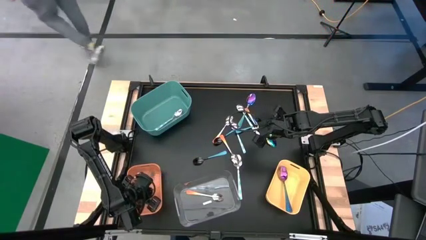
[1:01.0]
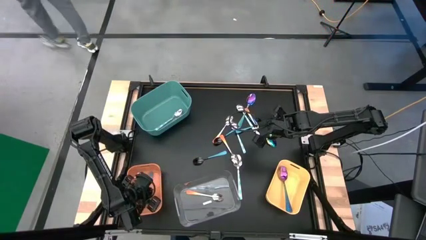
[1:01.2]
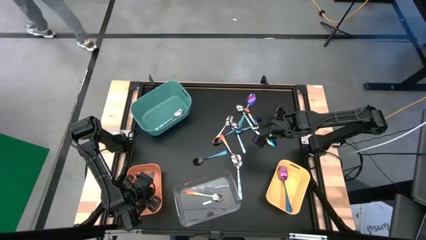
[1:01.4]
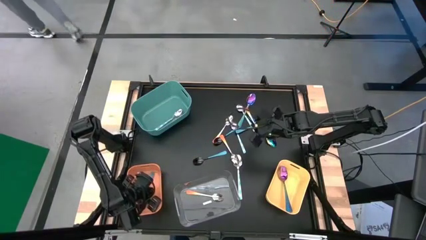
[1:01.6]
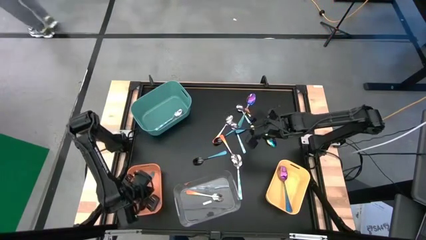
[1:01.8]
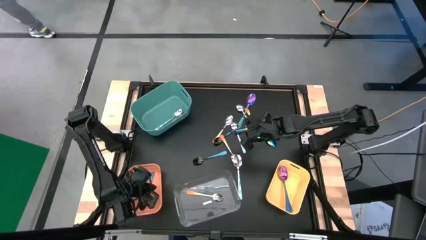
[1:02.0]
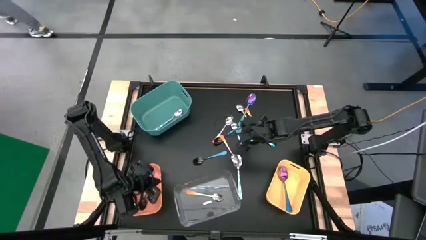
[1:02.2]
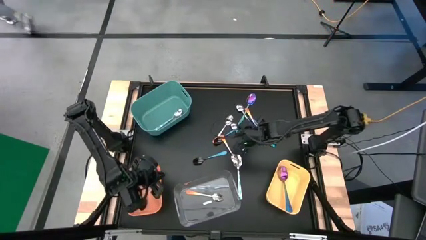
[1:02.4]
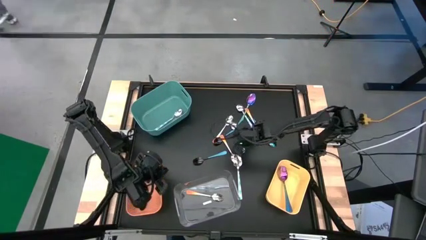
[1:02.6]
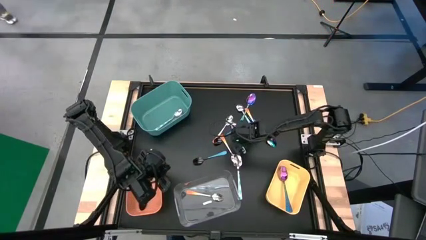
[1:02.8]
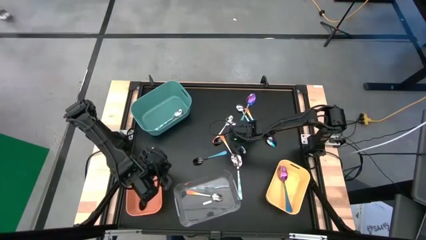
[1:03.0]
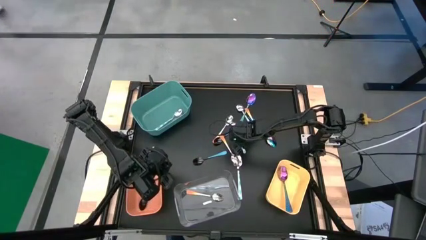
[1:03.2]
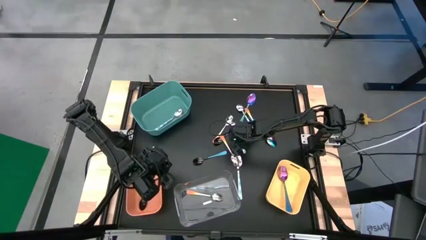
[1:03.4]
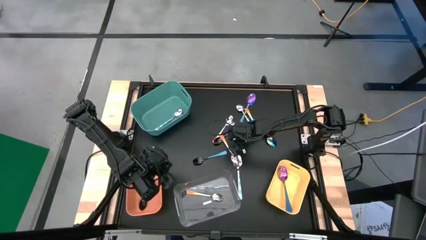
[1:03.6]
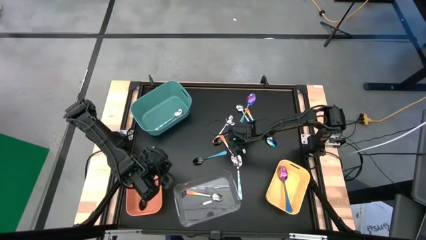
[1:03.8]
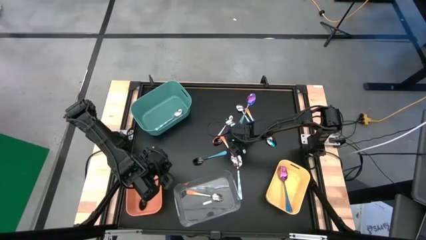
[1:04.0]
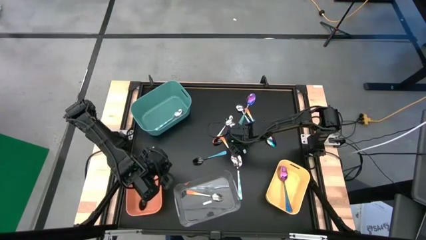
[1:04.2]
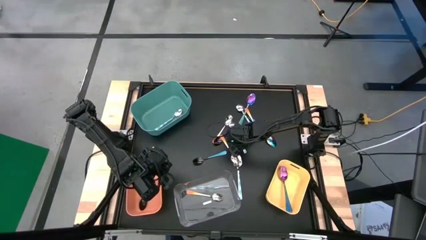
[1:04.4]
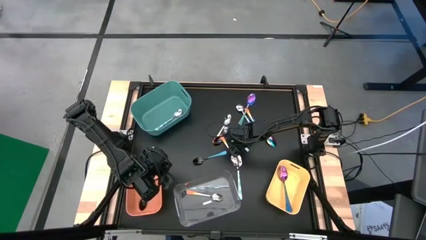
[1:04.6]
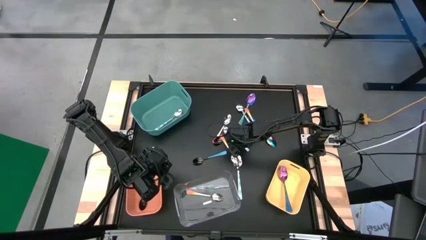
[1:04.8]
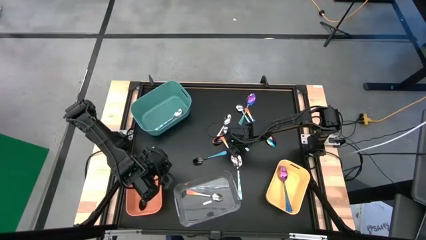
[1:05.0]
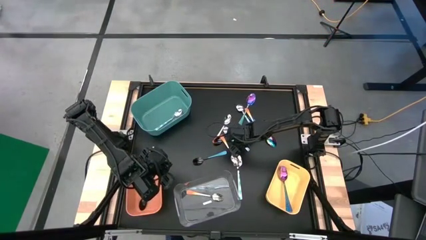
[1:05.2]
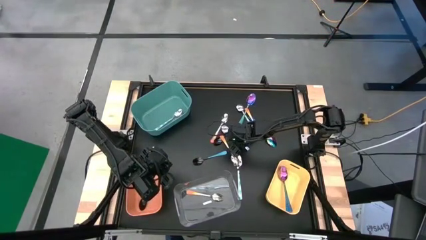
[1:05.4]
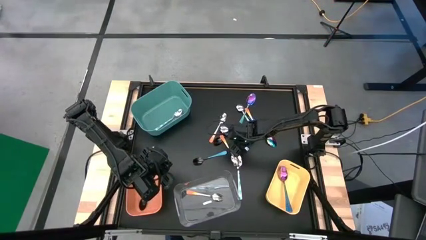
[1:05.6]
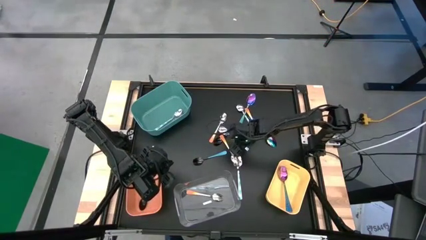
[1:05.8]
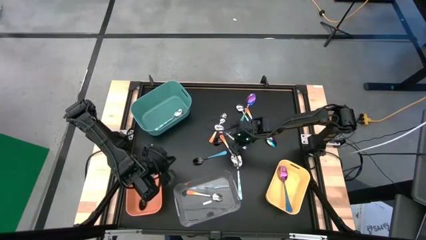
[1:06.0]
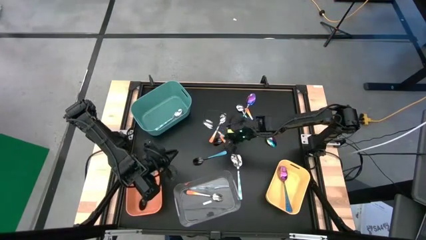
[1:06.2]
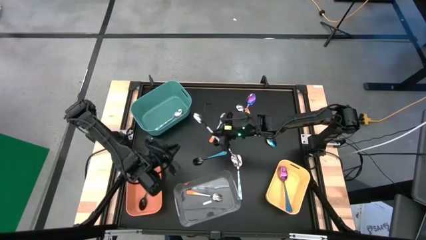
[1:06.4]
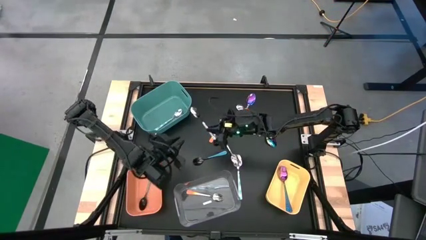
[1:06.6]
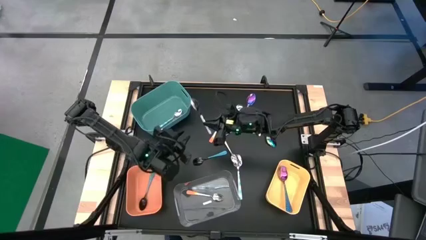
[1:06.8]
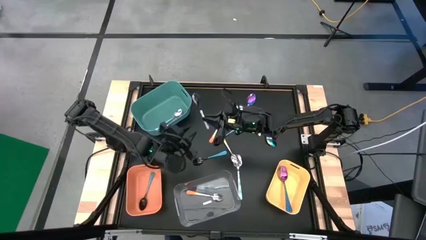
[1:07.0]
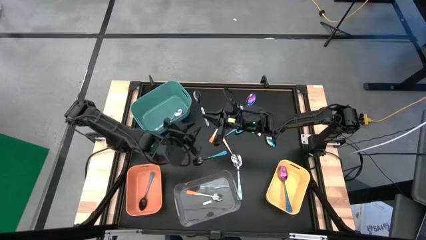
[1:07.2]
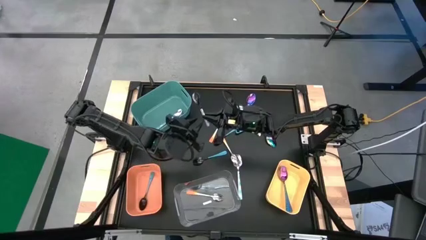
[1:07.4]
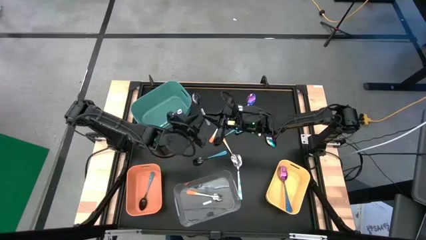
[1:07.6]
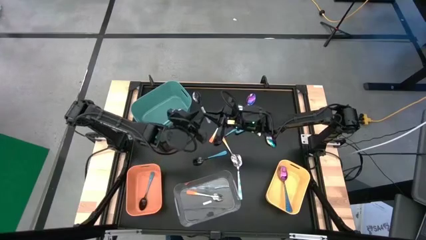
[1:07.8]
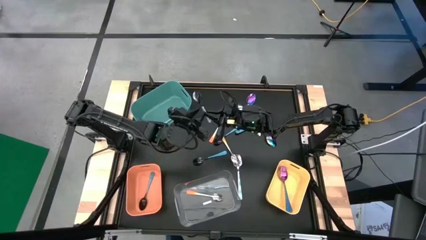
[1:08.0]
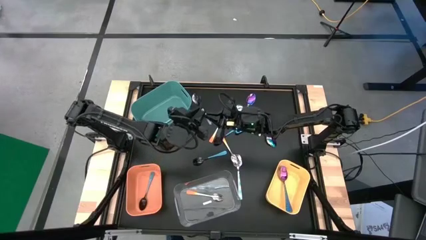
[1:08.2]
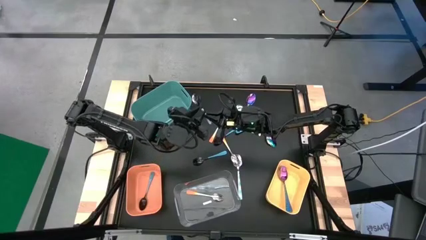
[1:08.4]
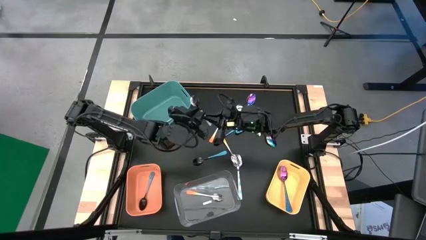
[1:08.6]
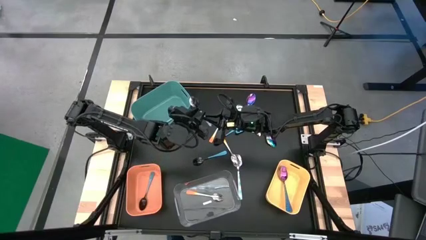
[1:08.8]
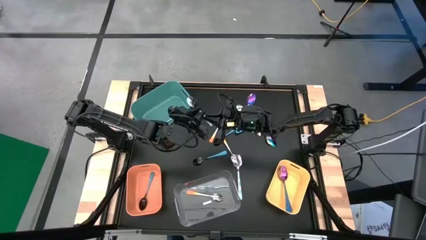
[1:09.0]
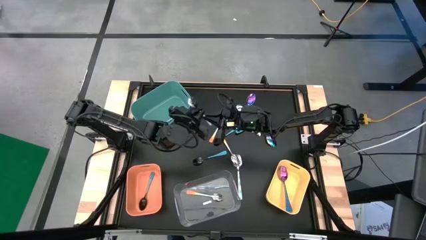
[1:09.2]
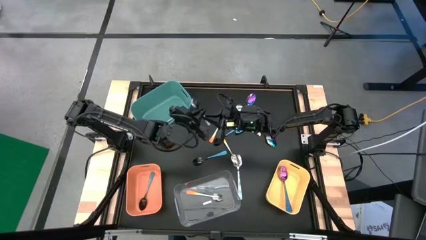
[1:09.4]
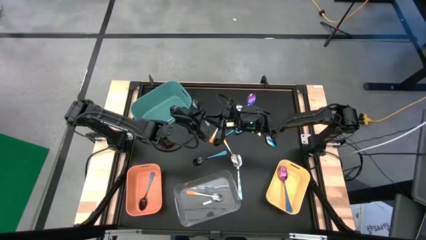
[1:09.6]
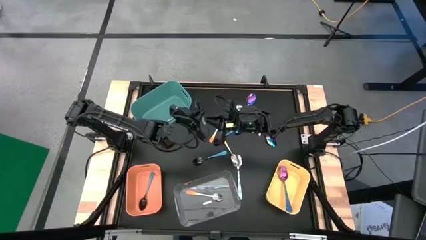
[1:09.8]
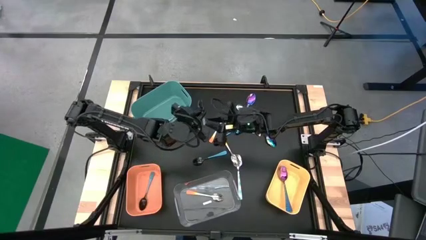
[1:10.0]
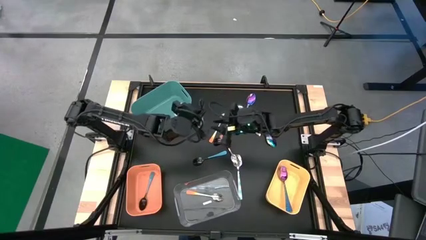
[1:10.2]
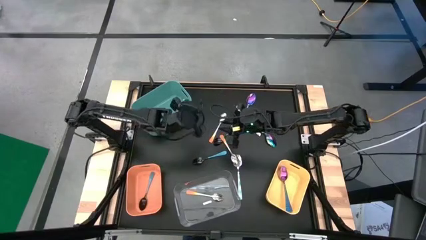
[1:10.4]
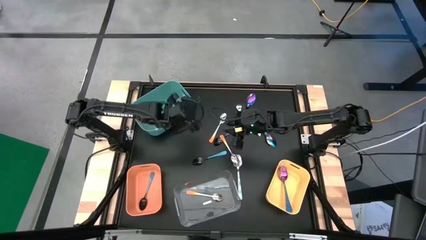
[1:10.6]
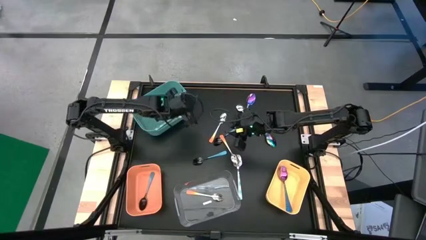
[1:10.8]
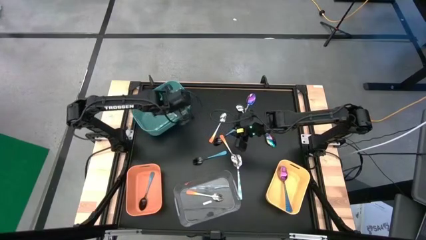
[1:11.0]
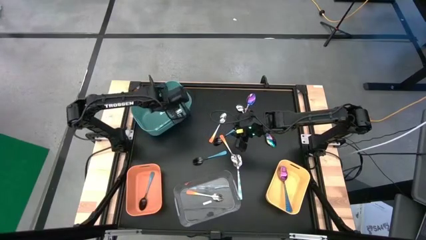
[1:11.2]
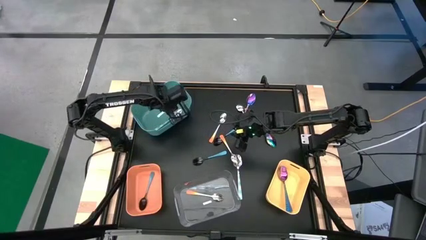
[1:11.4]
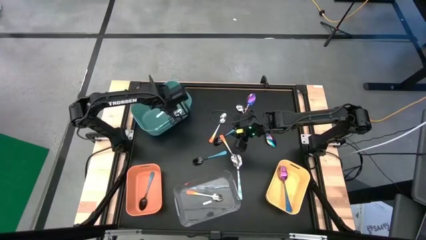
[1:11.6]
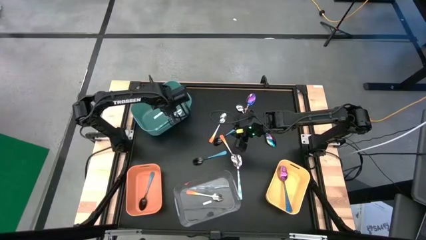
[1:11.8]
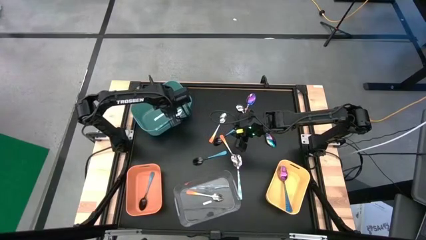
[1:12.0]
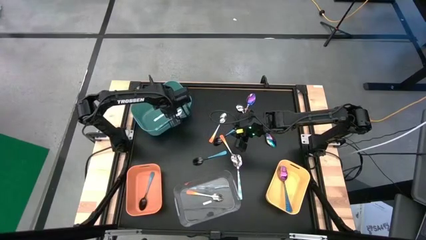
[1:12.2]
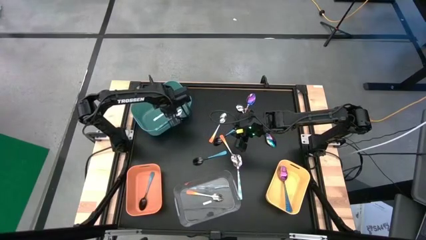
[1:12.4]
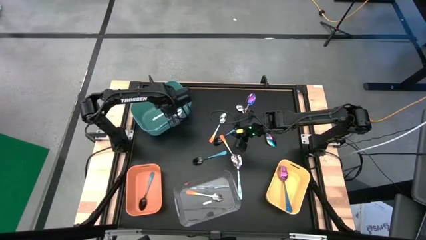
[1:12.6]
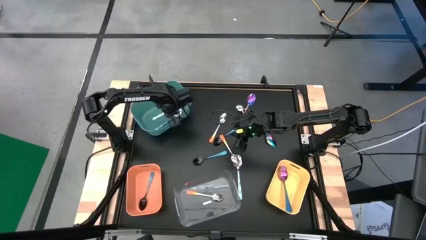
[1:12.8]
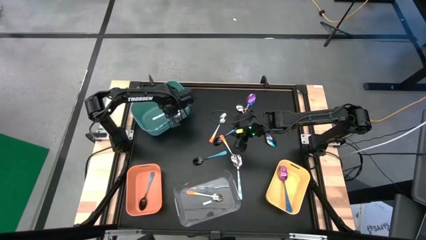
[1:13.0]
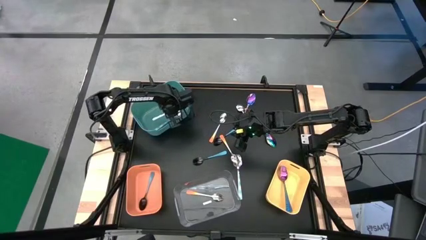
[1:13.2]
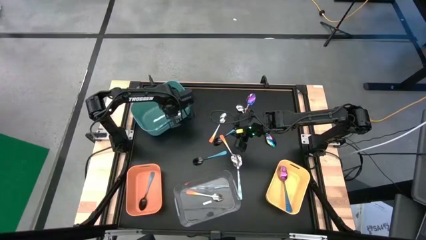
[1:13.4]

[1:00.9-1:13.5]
Task: Sort silverware by color (type)
Put the white-green spoon into the blue bin

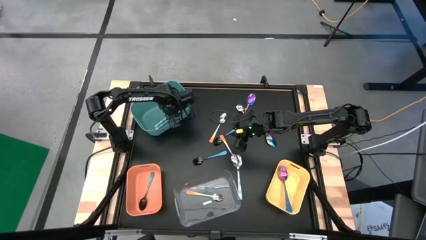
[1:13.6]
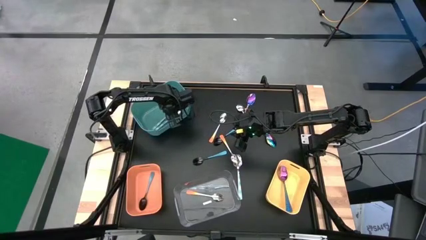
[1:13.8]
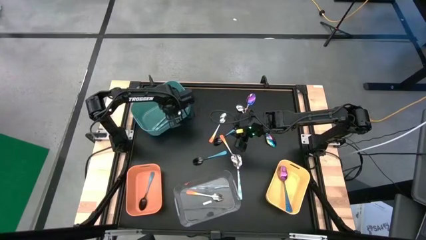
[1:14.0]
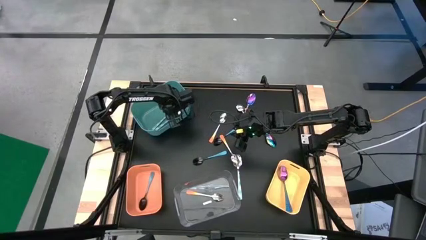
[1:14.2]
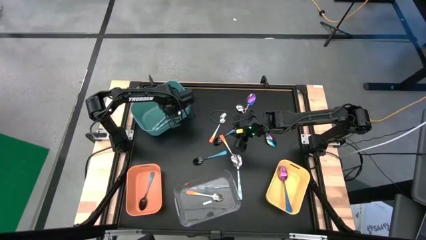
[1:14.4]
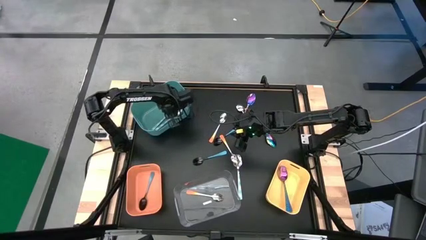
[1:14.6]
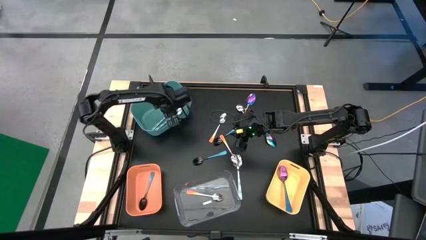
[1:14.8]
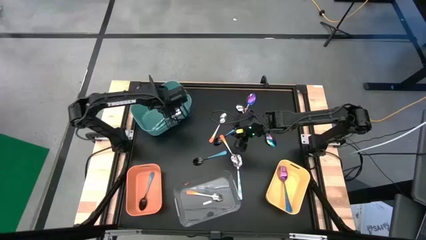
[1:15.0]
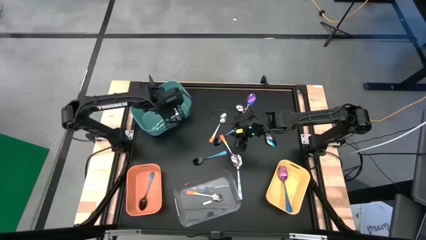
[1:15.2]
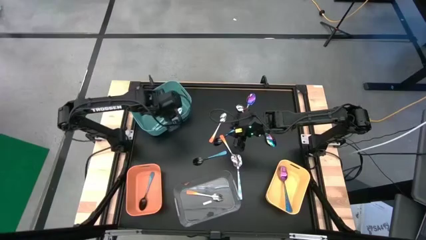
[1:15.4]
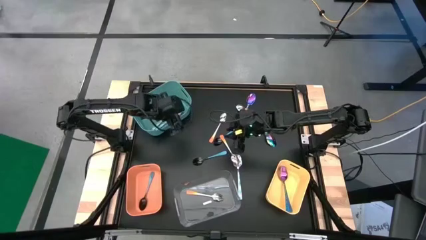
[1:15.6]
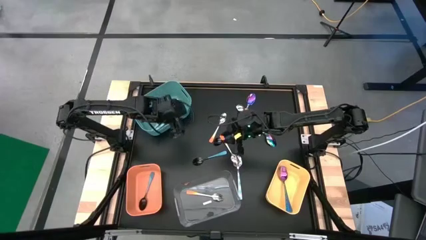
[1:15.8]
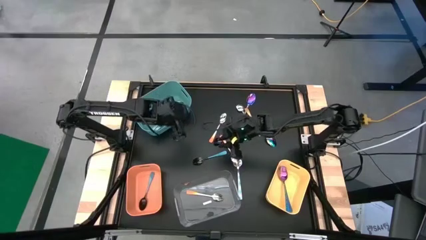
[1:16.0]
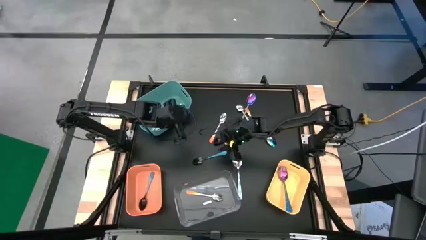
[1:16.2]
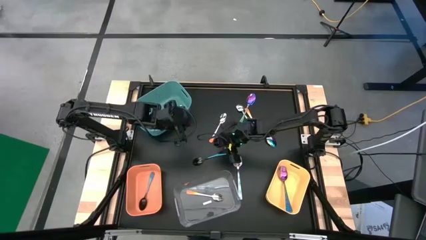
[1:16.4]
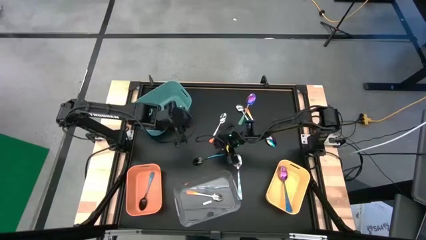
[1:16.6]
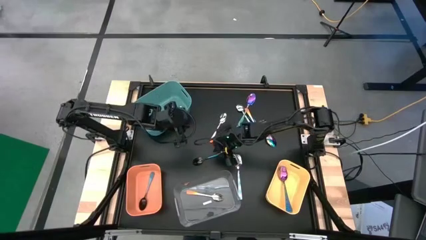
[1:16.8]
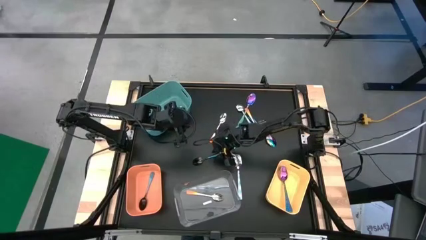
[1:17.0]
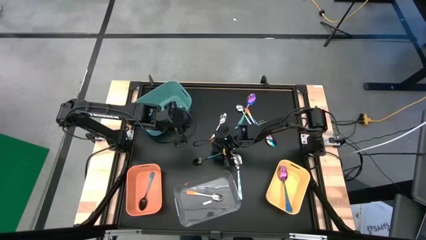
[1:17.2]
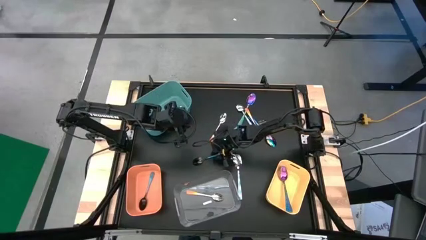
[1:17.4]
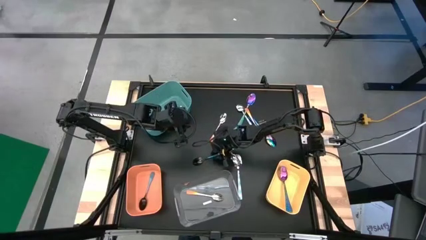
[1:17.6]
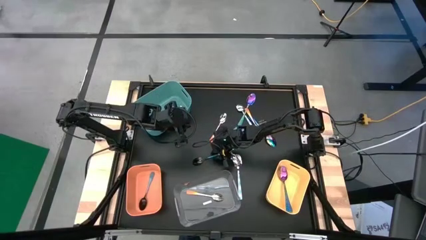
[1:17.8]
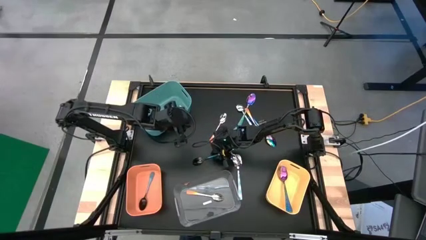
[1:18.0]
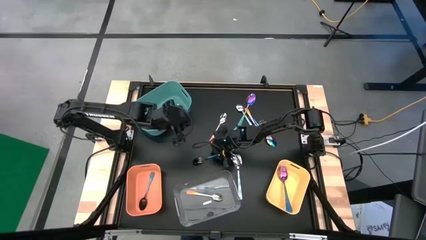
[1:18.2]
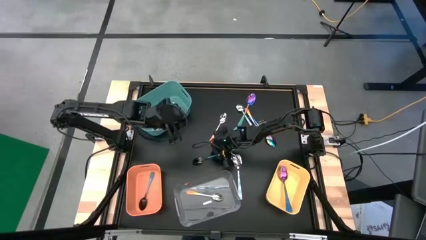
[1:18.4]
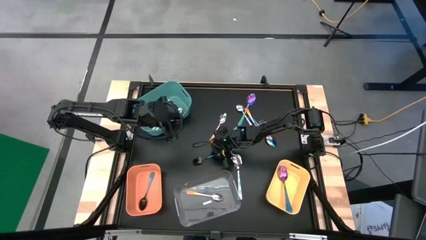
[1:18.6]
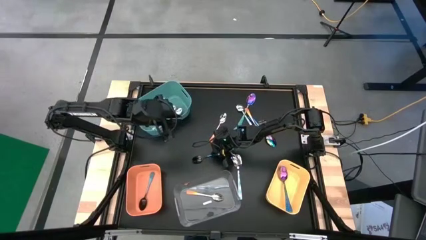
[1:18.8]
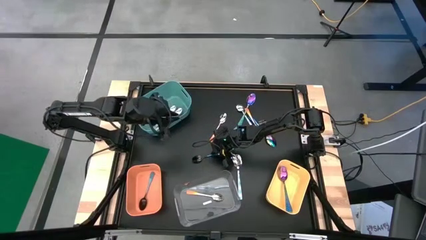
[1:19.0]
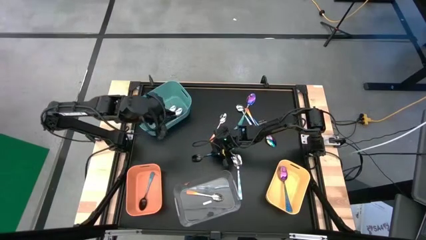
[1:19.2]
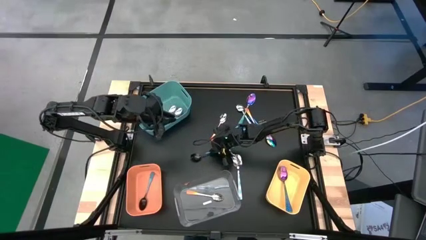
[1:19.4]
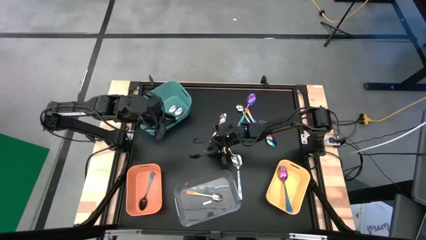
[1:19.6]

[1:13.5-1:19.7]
Put the blue spoon into the orange bin
